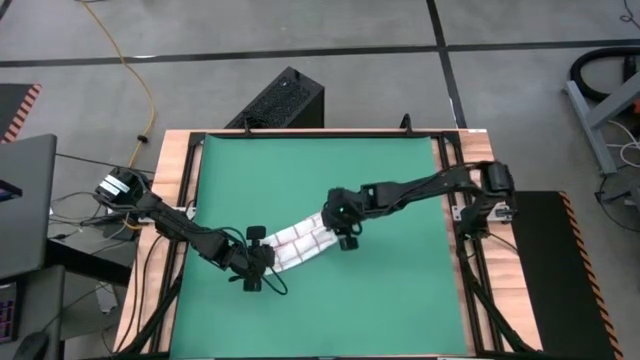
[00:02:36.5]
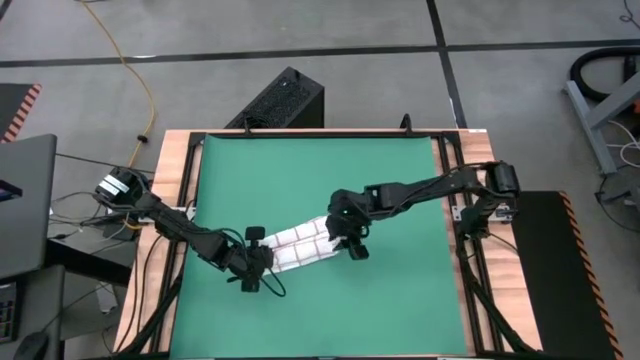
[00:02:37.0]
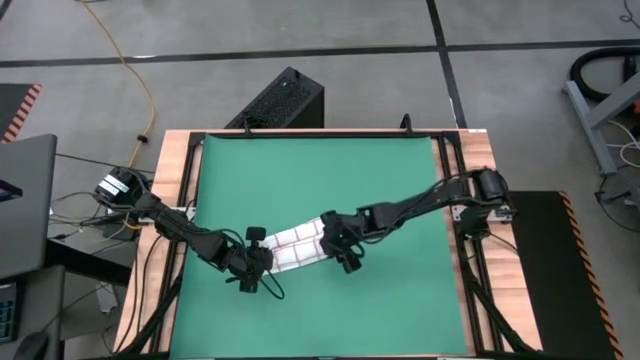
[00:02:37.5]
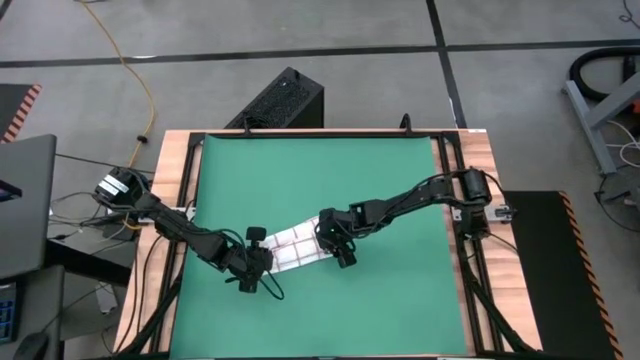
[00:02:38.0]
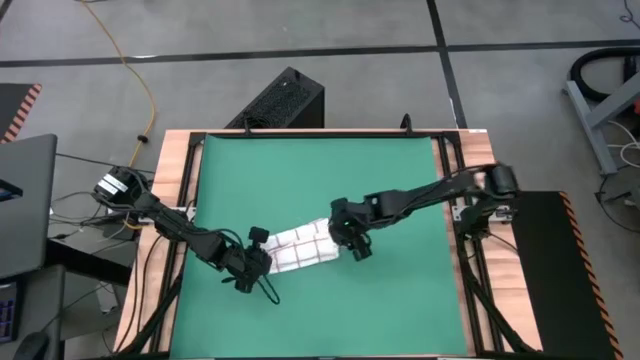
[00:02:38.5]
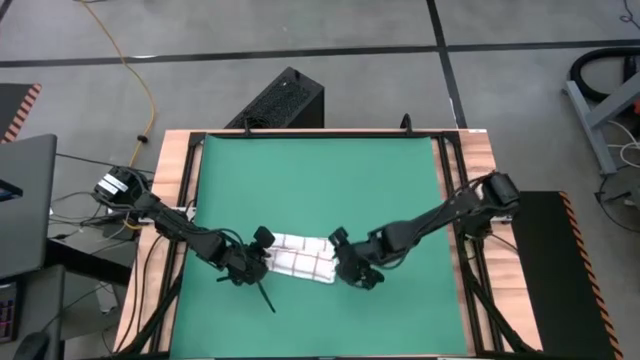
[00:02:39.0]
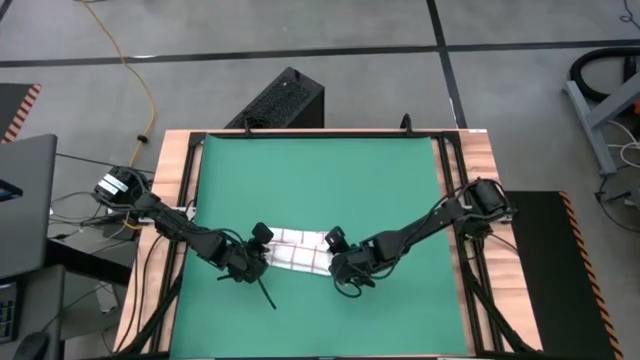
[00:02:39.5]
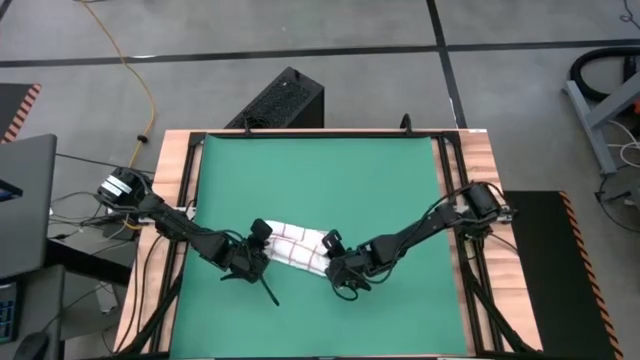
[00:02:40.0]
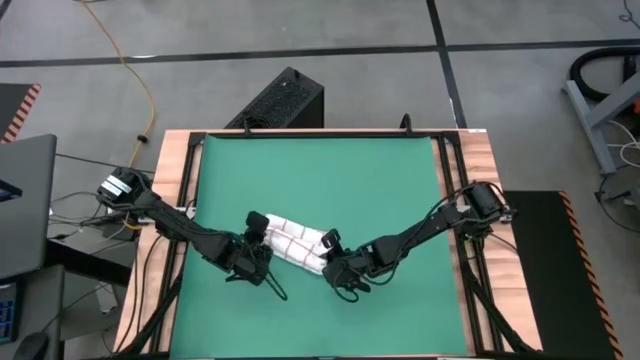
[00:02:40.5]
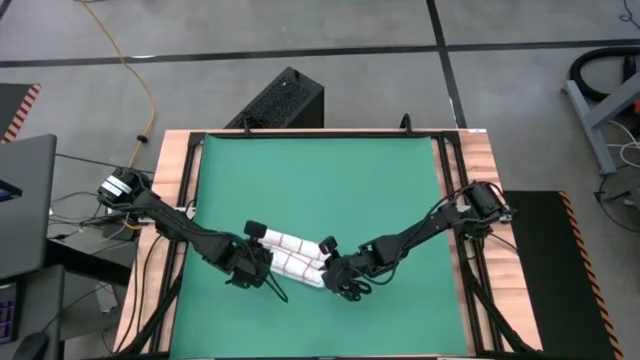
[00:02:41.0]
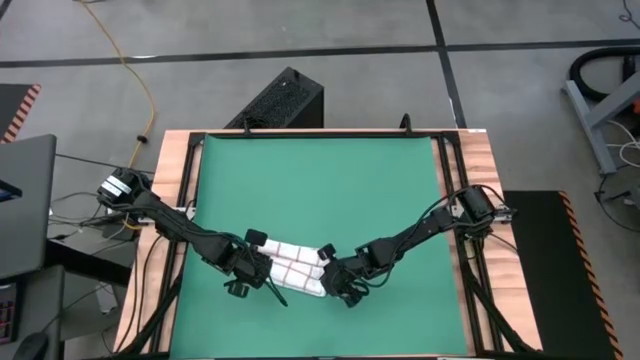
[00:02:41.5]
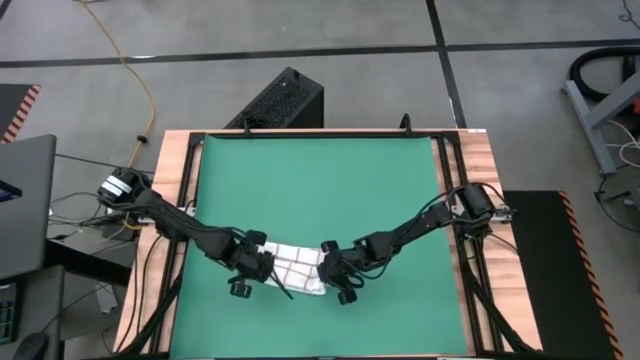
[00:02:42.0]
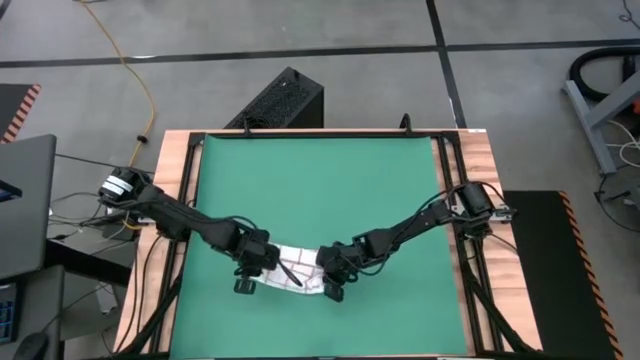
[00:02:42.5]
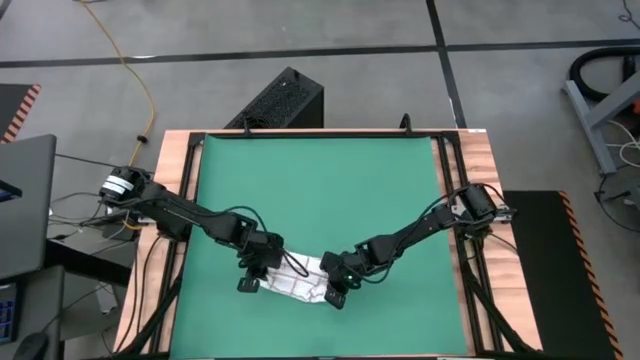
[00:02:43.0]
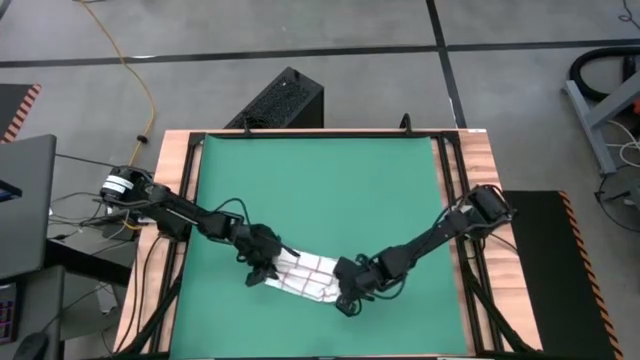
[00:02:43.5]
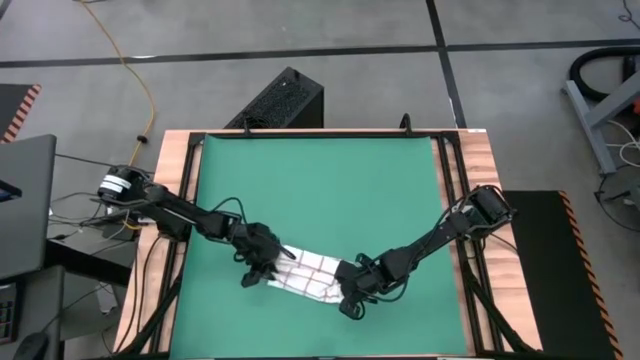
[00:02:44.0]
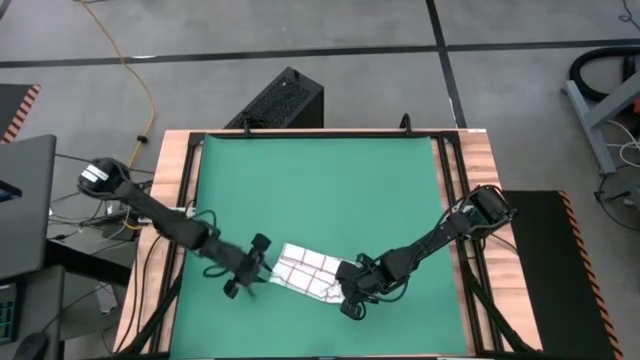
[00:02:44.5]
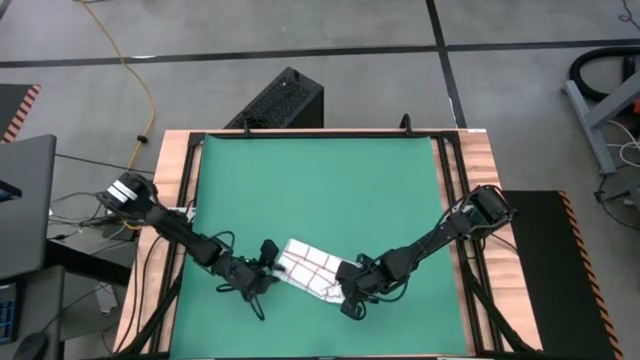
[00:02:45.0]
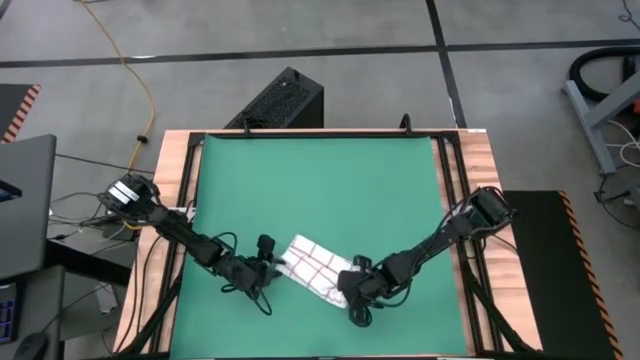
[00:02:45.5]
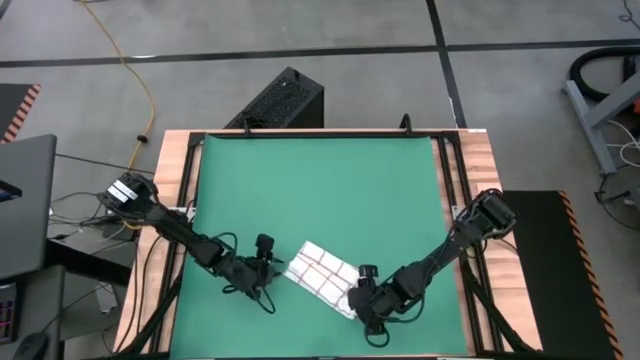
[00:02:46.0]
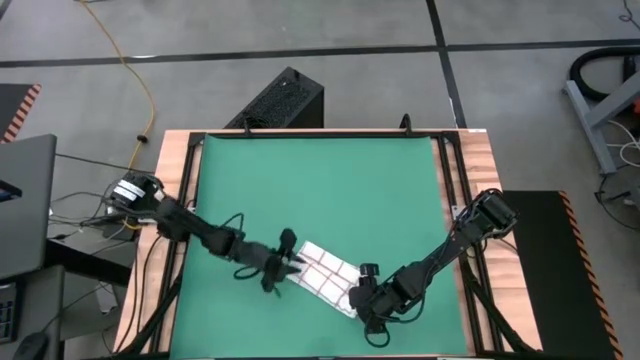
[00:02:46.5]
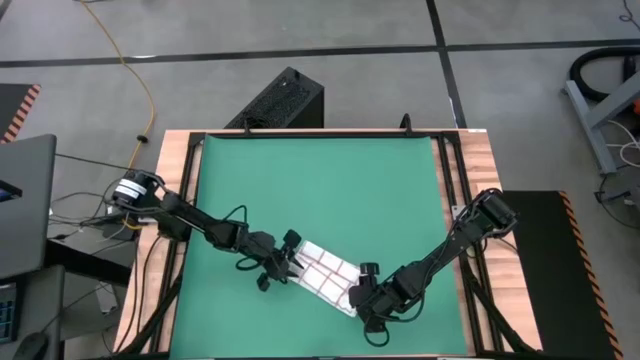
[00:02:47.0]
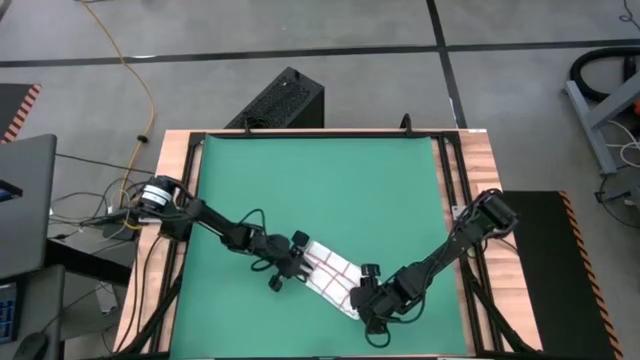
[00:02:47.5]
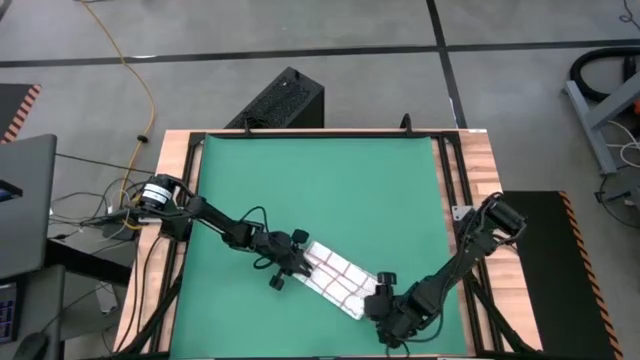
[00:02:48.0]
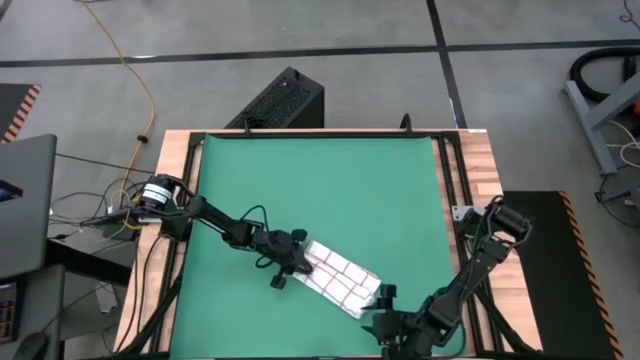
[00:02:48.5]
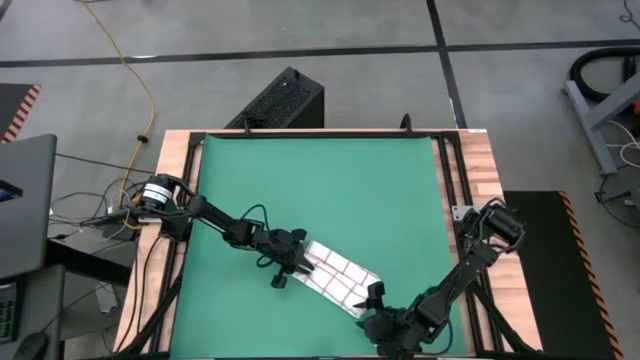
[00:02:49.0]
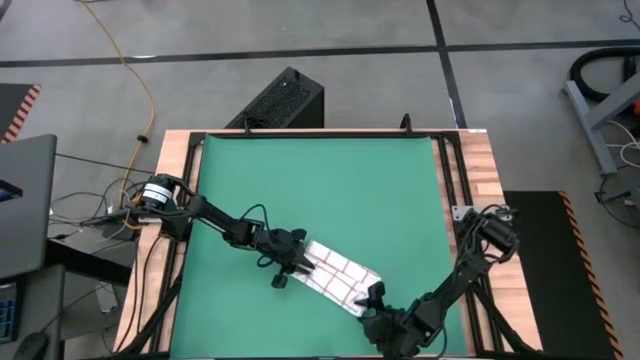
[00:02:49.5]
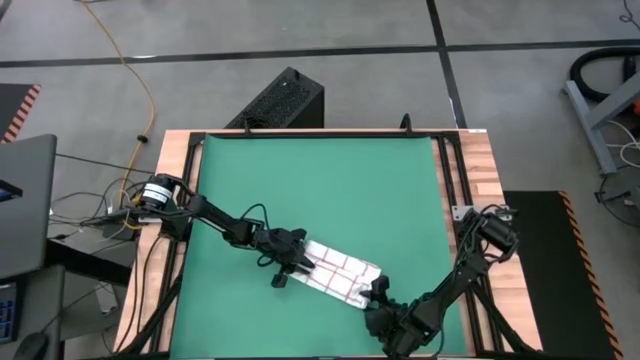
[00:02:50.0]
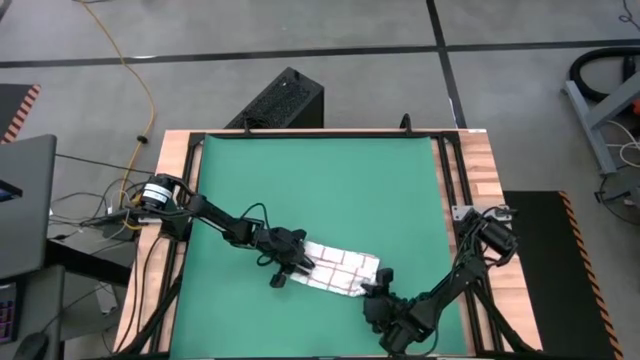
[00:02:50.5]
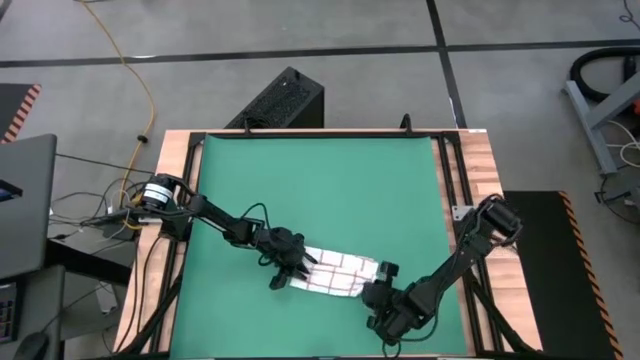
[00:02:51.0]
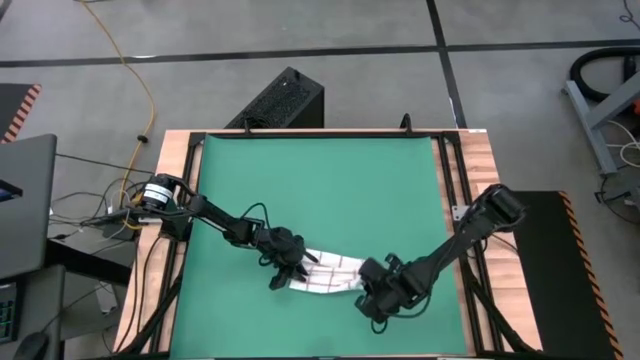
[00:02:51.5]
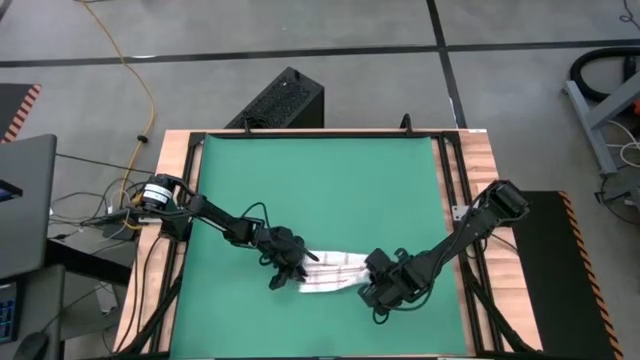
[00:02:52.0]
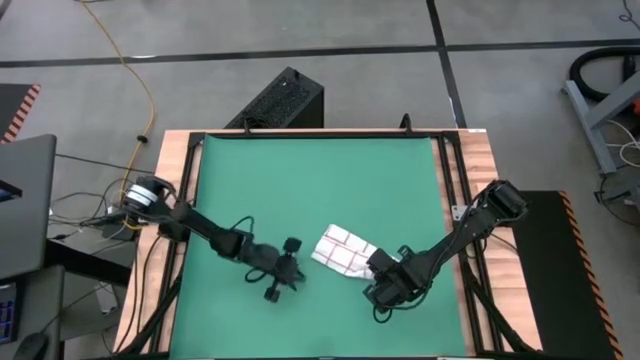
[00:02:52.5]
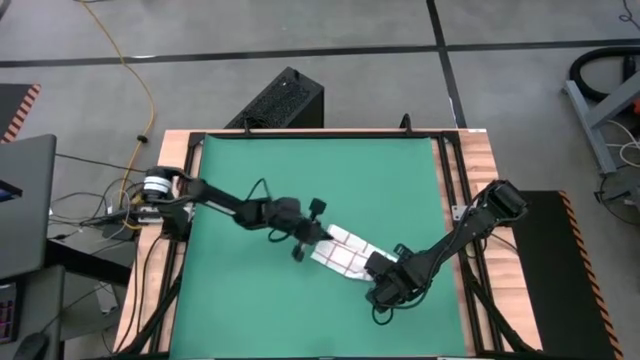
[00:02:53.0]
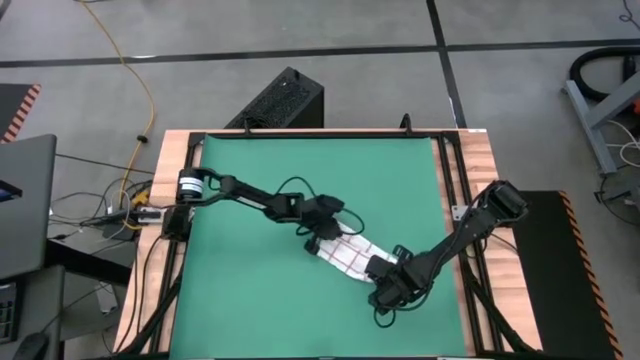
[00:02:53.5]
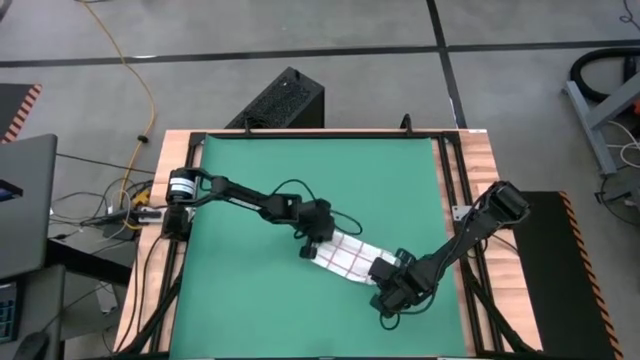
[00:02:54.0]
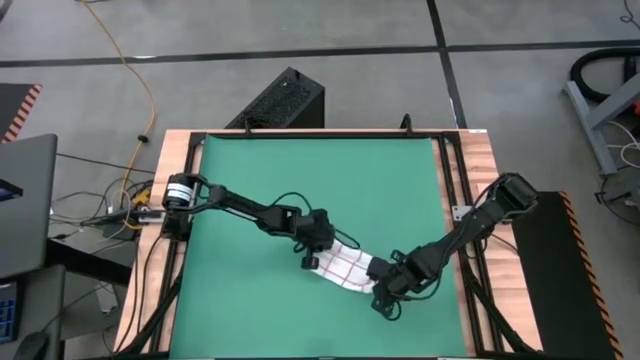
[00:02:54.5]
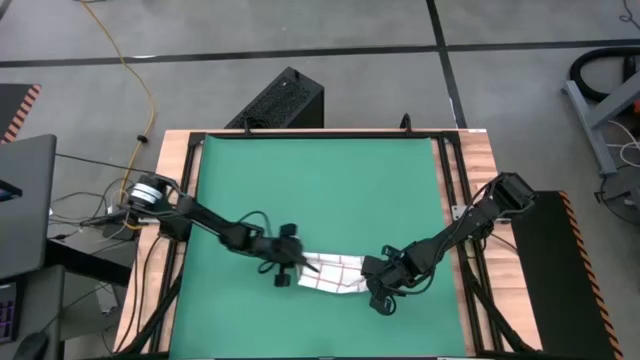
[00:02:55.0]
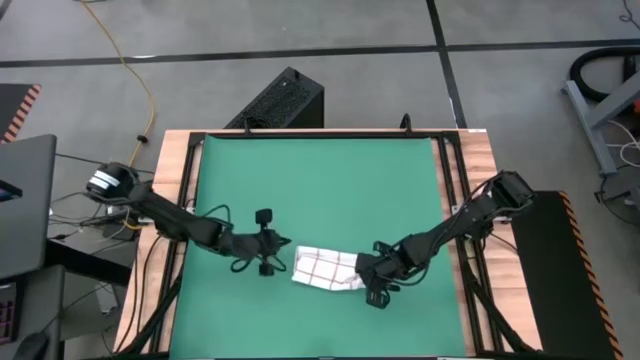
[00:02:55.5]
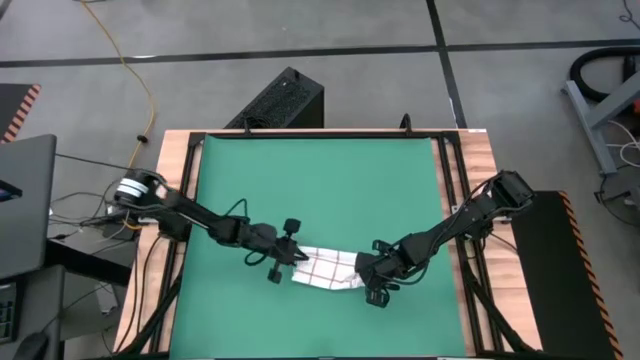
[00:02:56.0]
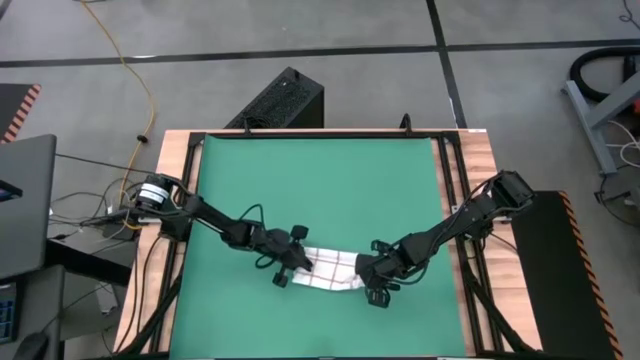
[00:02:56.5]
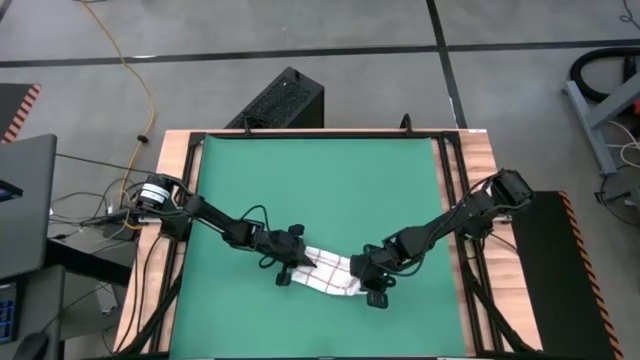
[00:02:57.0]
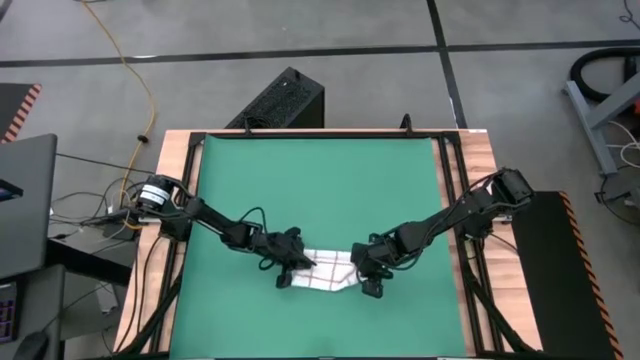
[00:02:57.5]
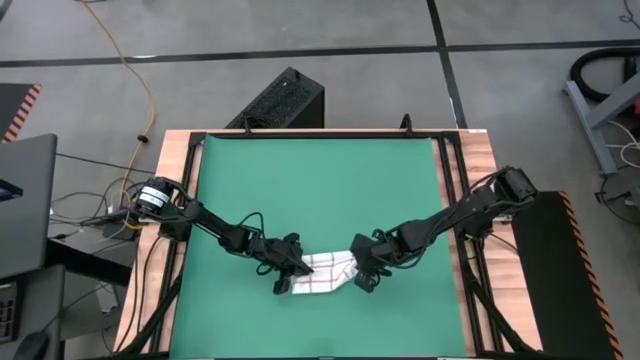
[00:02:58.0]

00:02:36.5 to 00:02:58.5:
Task: Roll towel into tight, uniform cylinder
Roll the kitchen towel on the table
